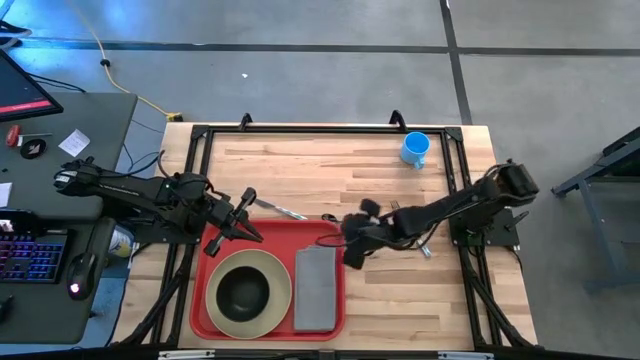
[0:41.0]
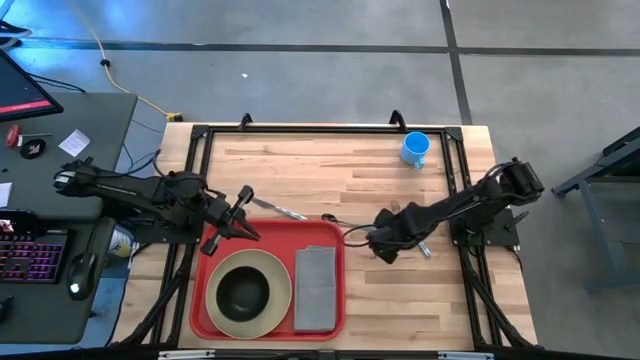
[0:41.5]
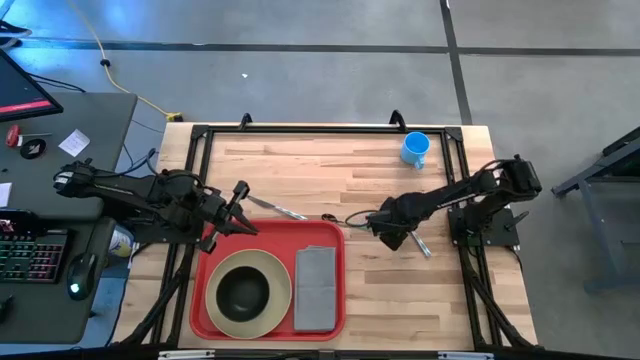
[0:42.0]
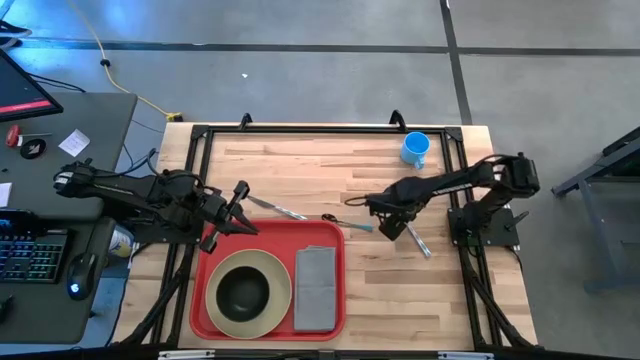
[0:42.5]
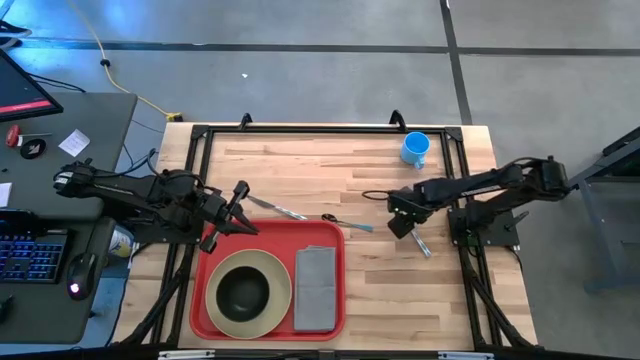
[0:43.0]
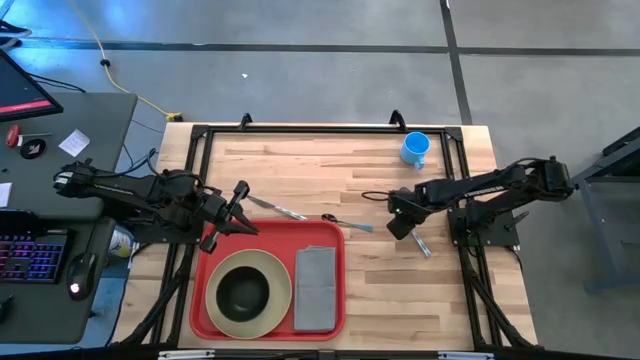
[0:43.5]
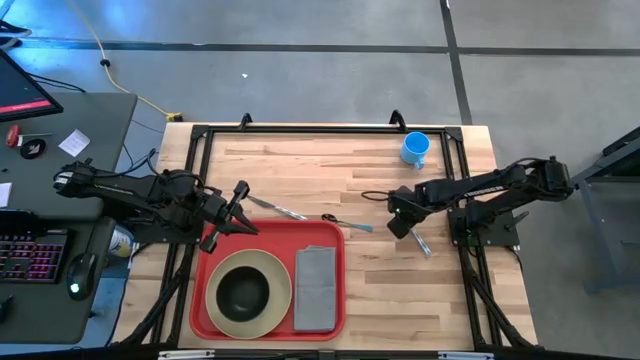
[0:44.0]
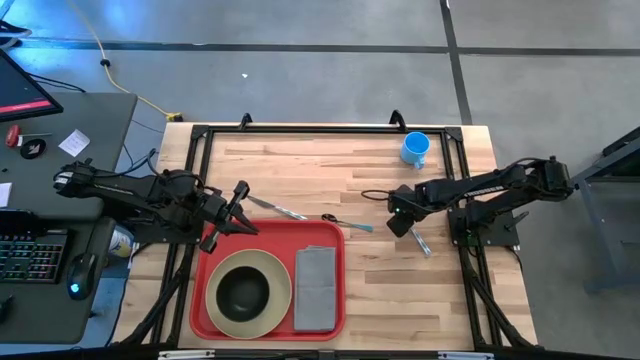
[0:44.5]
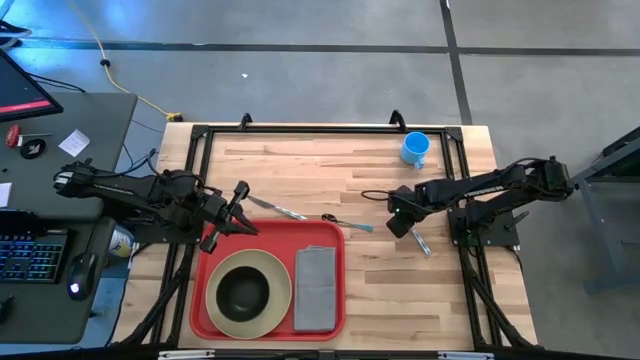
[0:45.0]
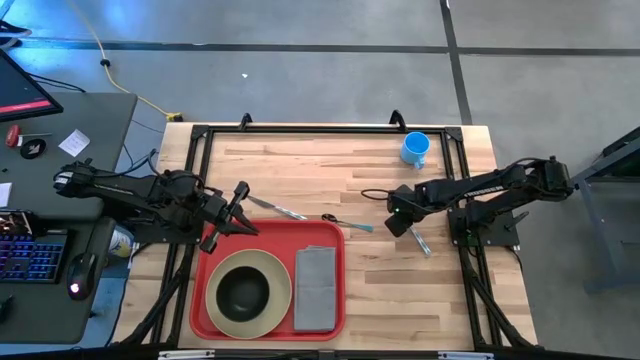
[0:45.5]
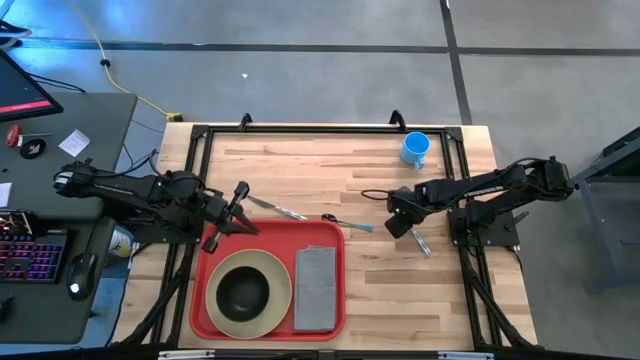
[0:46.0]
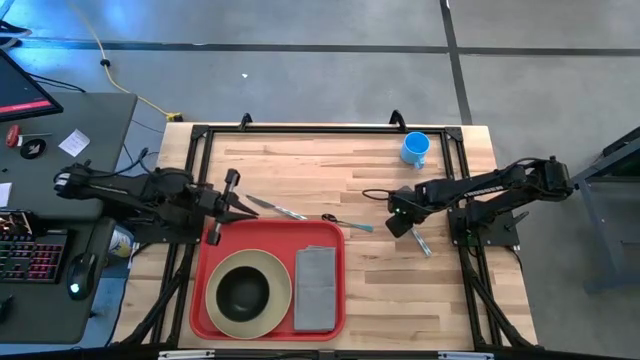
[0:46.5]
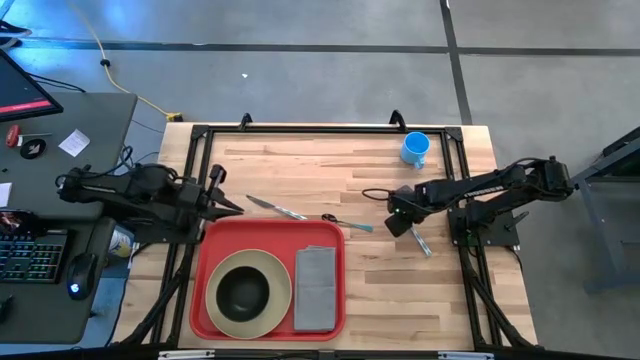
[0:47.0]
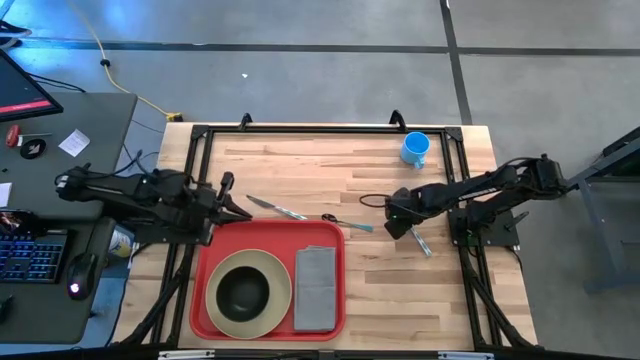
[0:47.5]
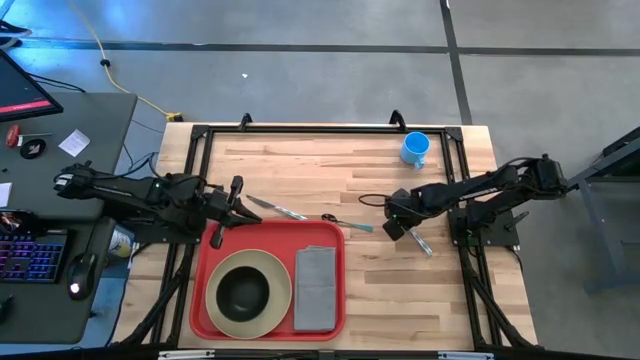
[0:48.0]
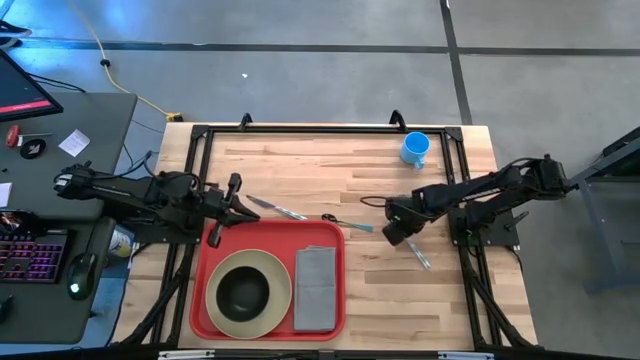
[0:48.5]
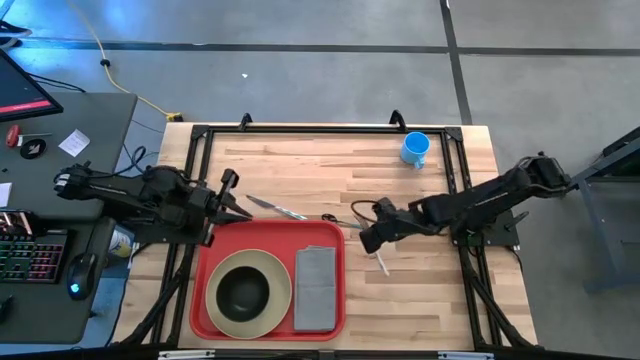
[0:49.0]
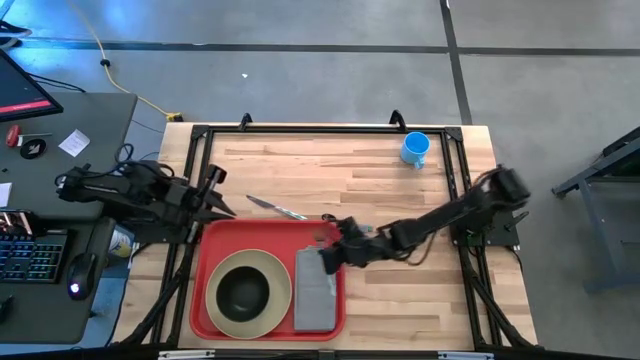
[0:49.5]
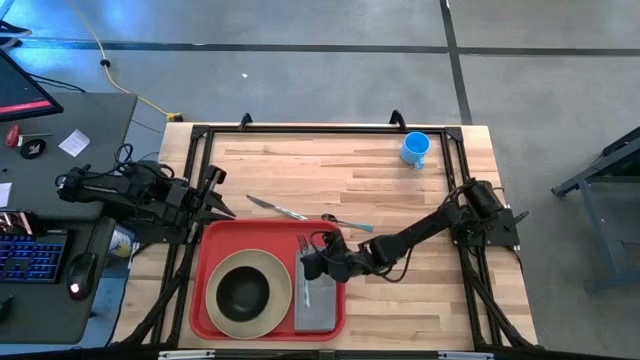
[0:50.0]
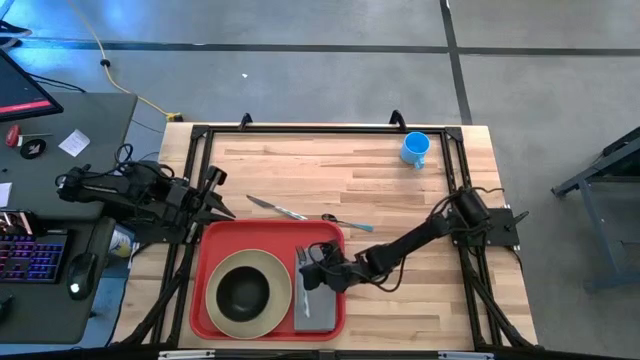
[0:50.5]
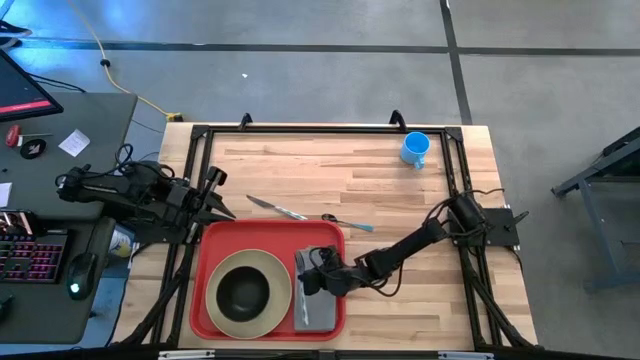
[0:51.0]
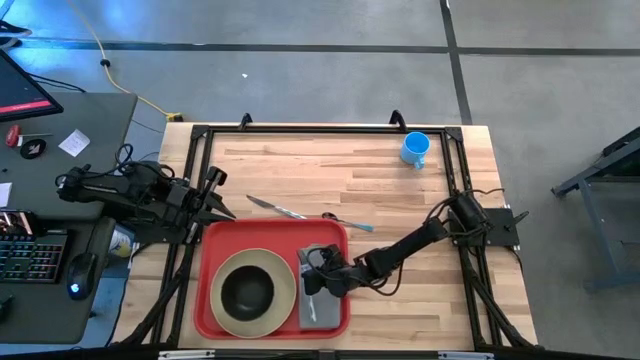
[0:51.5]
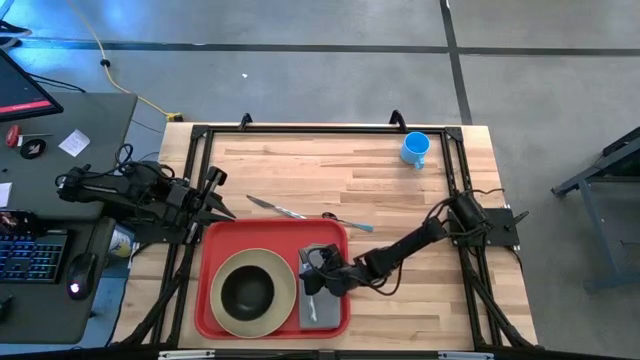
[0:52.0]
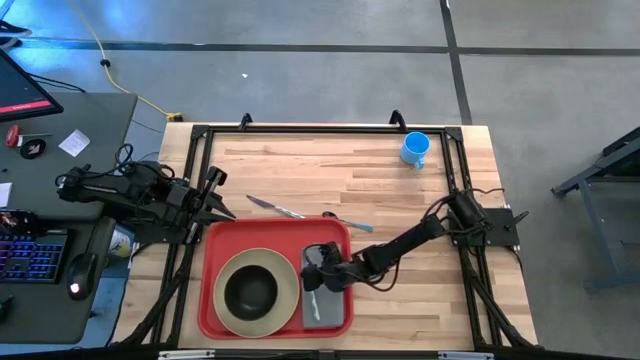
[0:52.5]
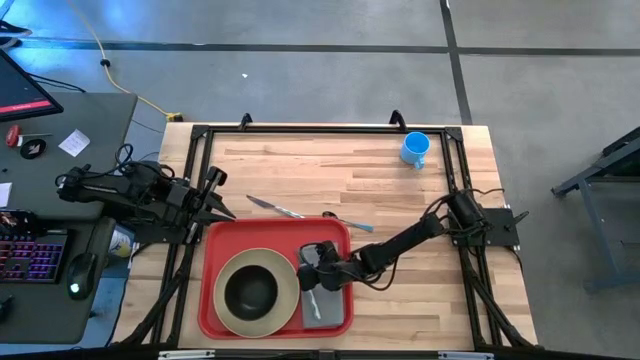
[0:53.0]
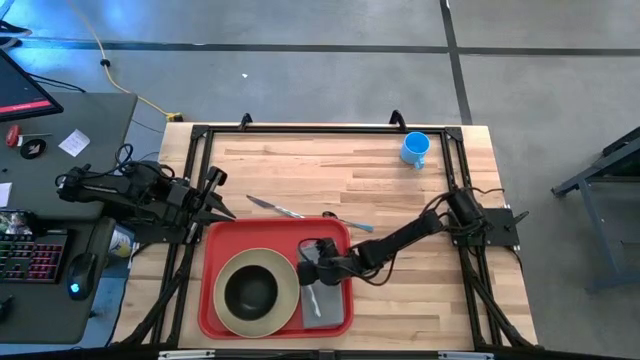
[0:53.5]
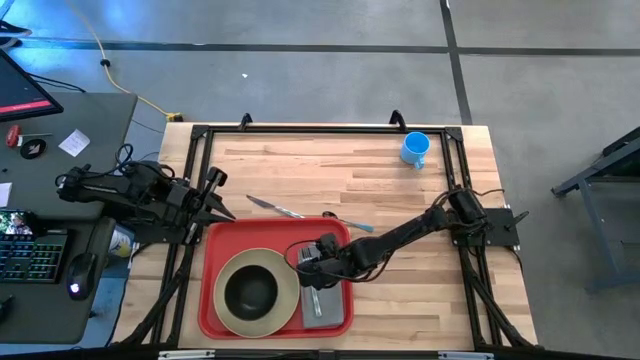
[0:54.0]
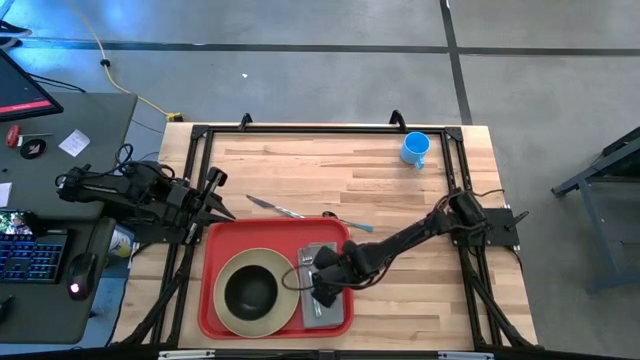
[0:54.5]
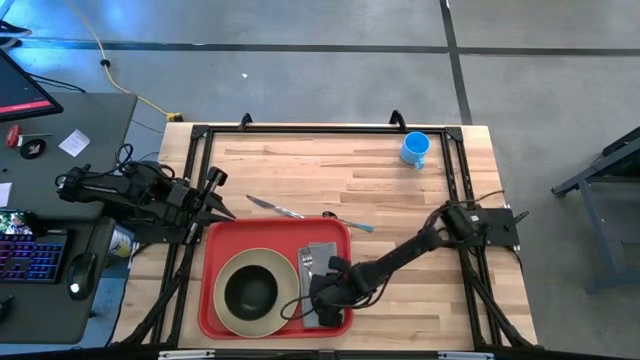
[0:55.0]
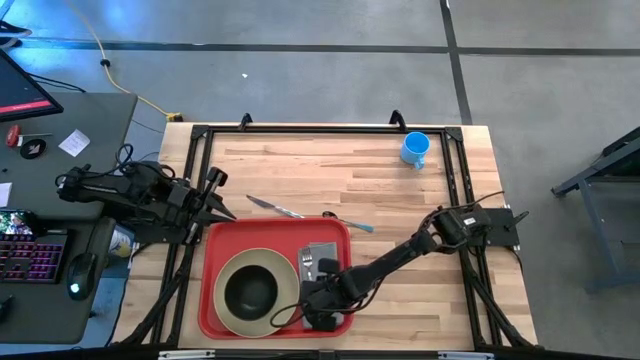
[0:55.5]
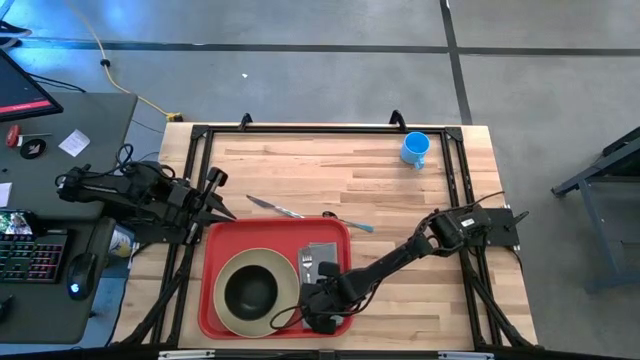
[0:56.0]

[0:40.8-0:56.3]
Task: Set up tray
Put the white patterned fork on top of the gray napkin

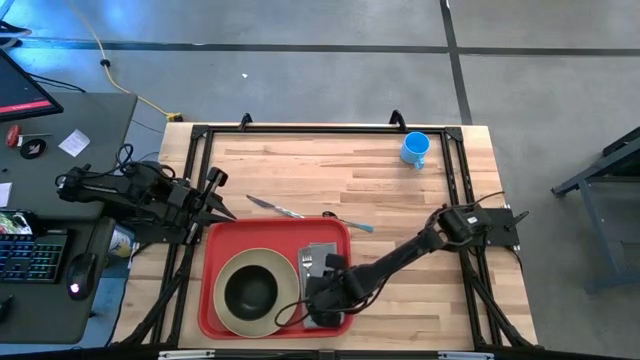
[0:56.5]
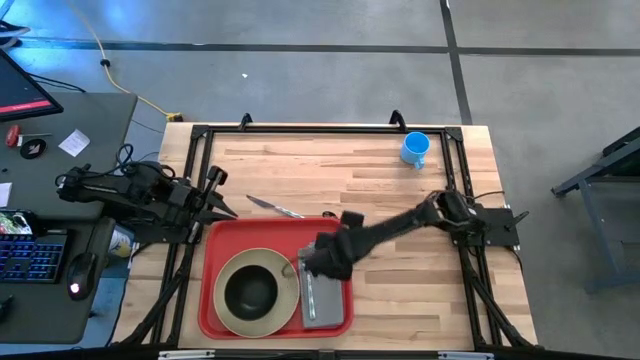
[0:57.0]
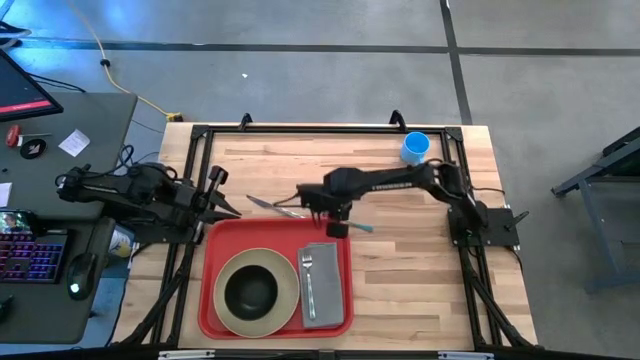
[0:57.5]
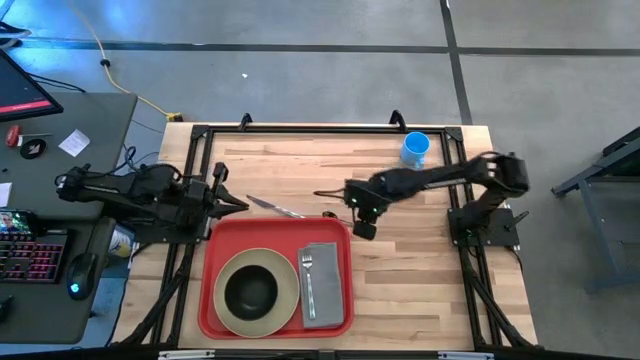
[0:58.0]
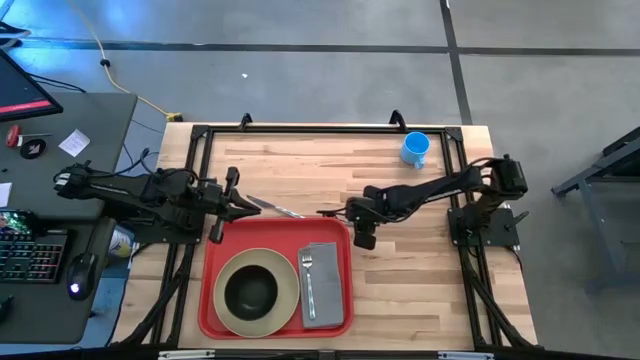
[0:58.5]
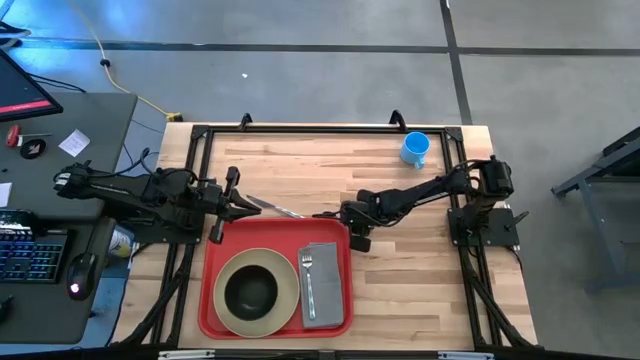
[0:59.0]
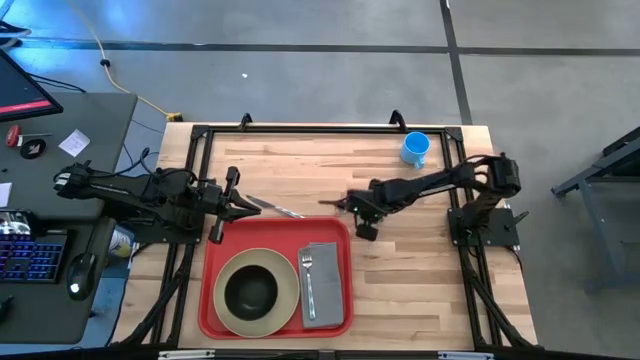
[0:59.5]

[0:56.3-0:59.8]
Put the blue spoon on top of the gray napkin to the right of the white patterned fork

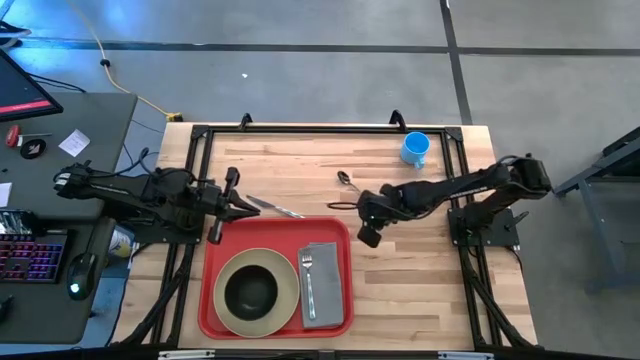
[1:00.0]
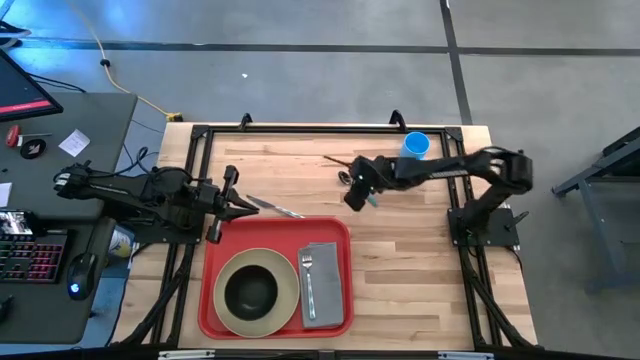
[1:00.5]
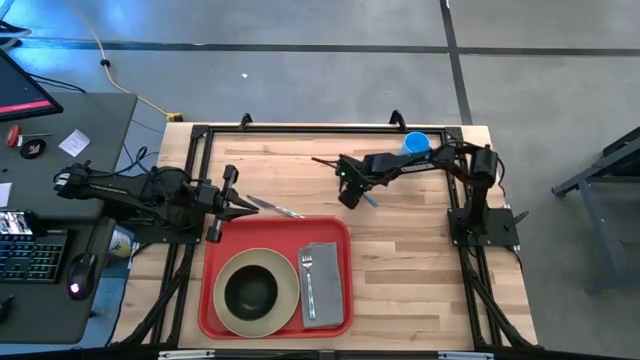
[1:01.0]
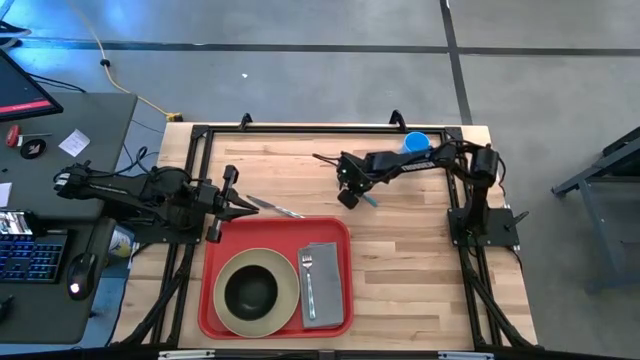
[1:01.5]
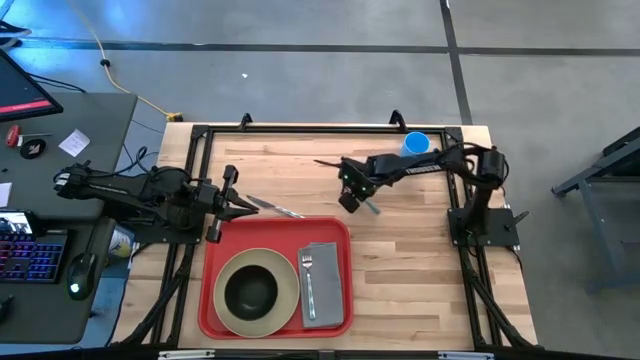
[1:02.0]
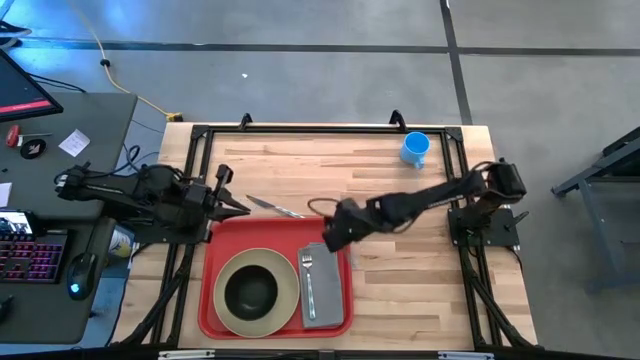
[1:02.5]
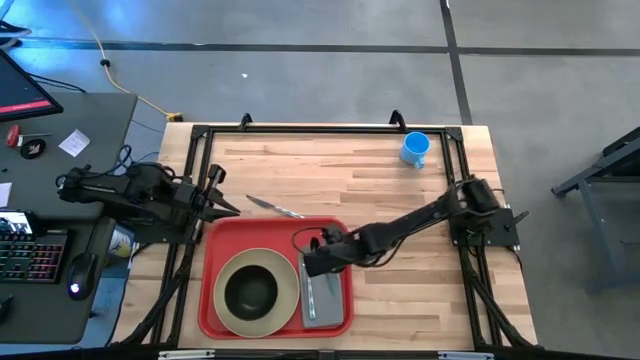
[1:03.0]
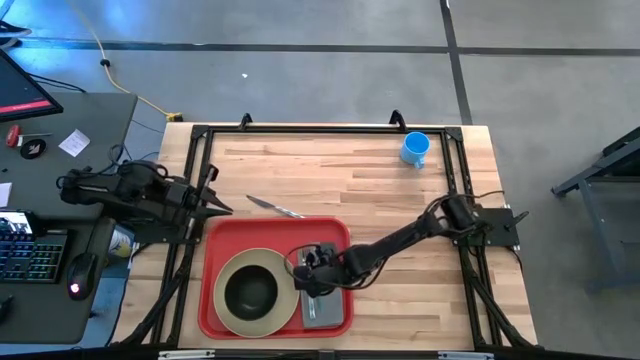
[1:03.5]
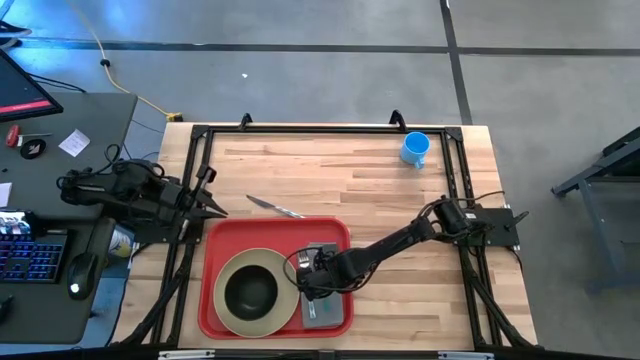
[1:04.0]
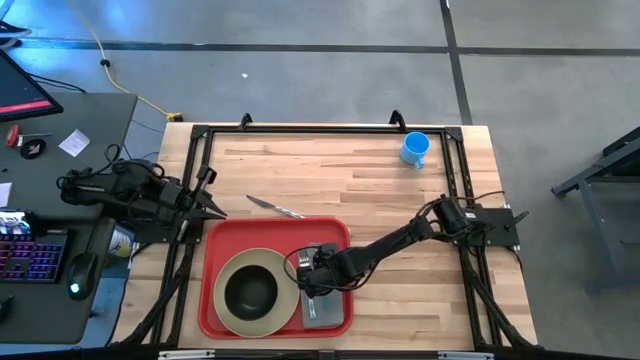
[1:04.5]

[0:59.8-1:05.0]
Put the blue spoon on top of the gray table napkin to the right of the white patterned fork
